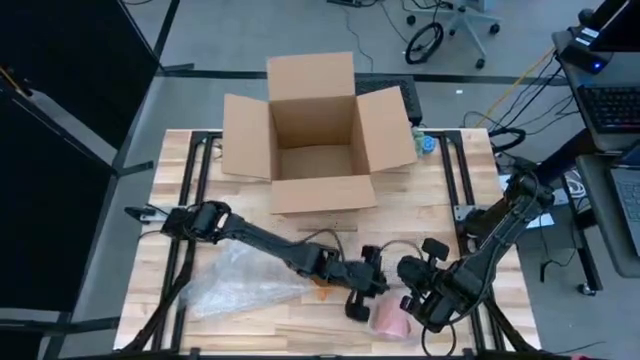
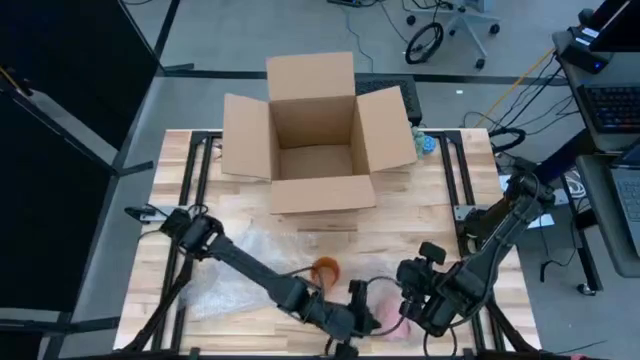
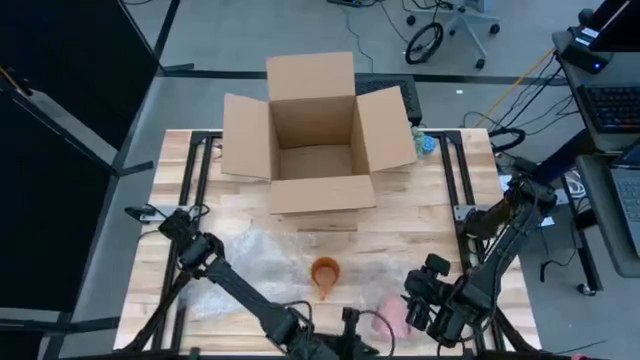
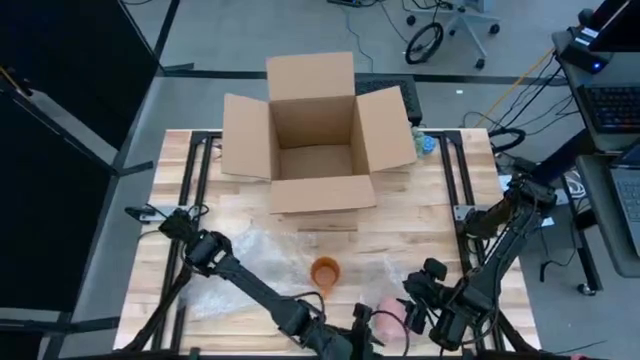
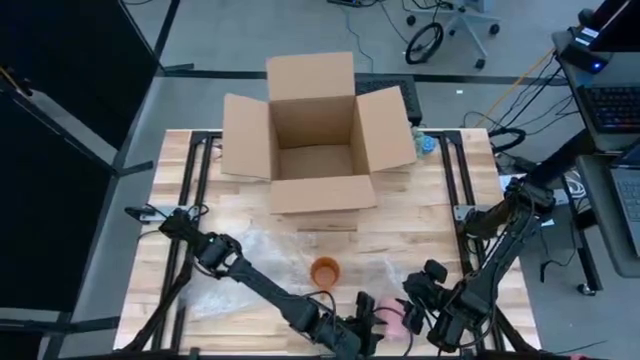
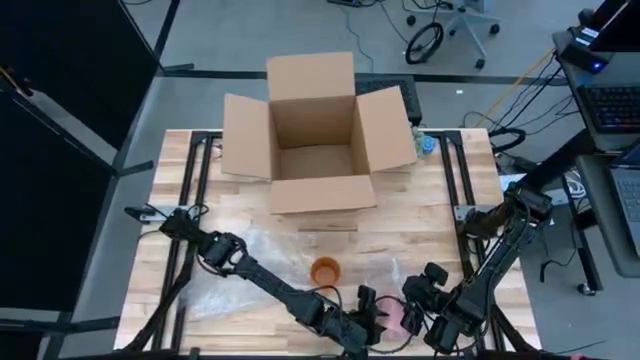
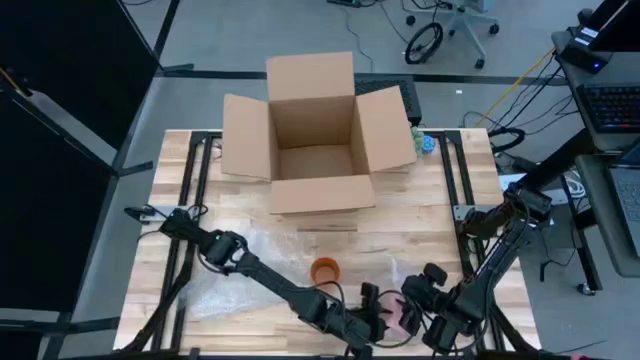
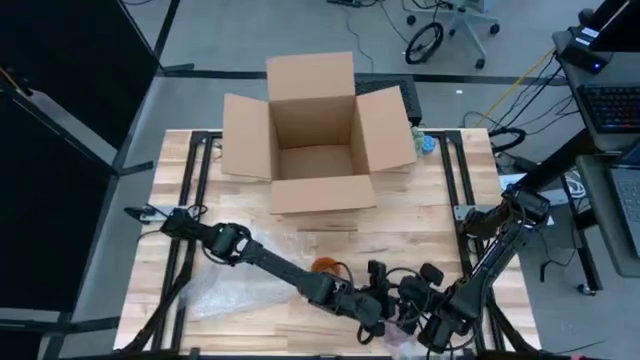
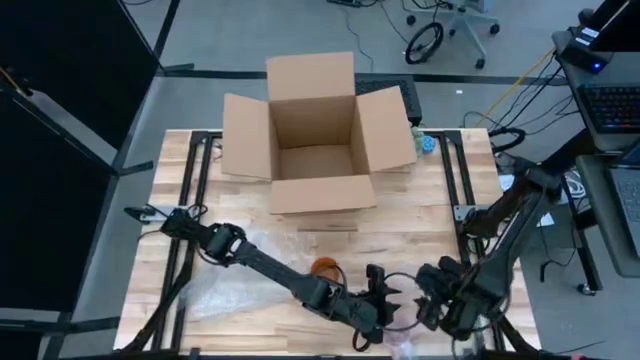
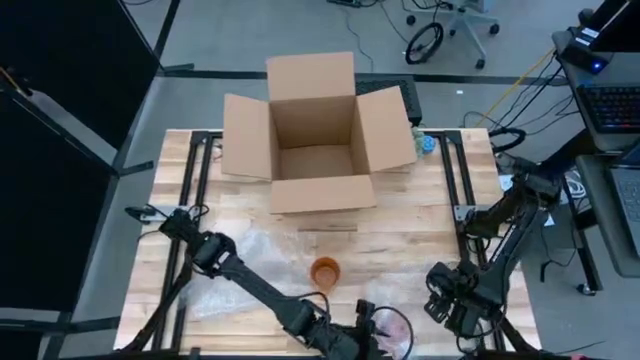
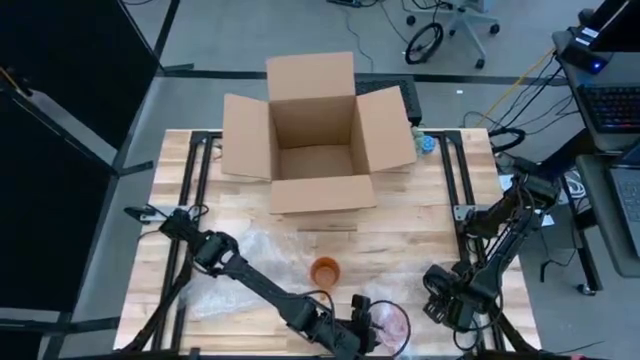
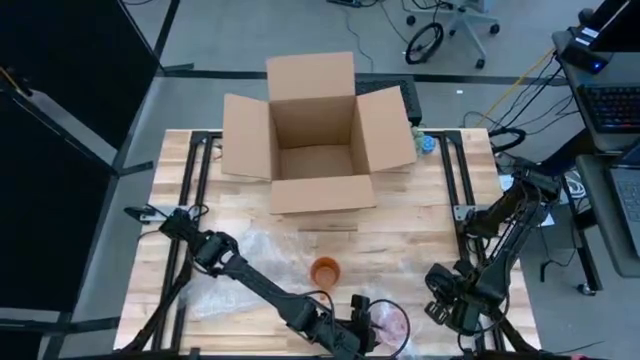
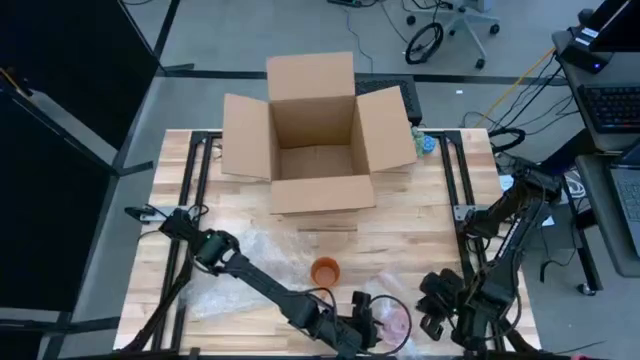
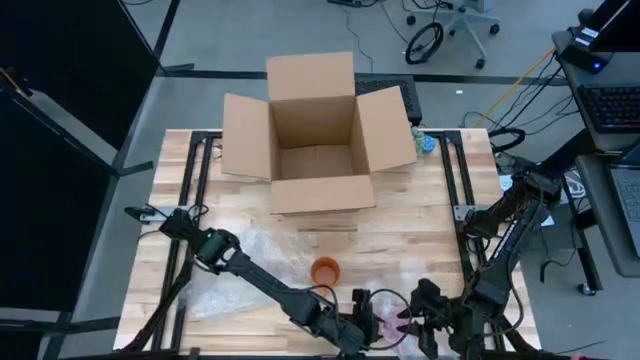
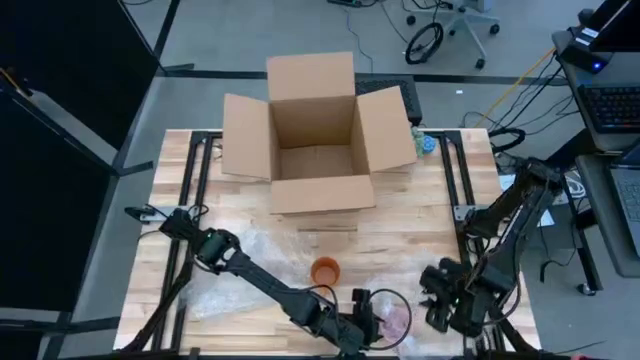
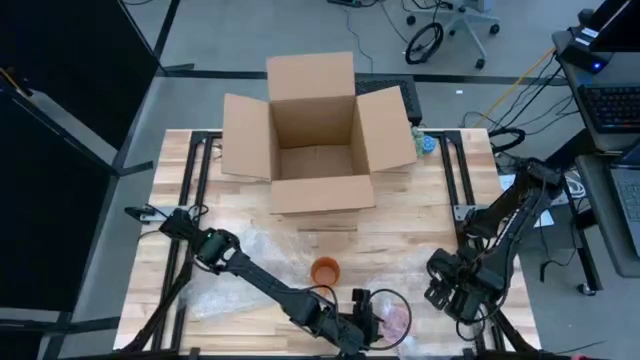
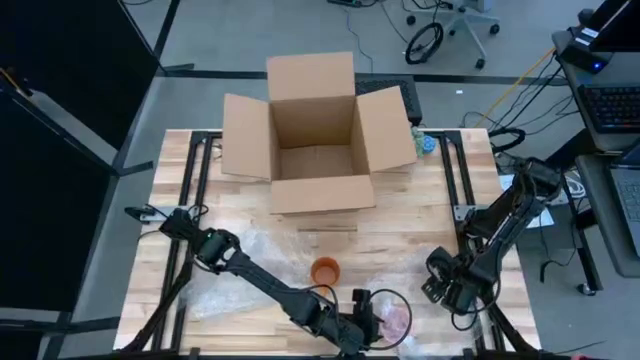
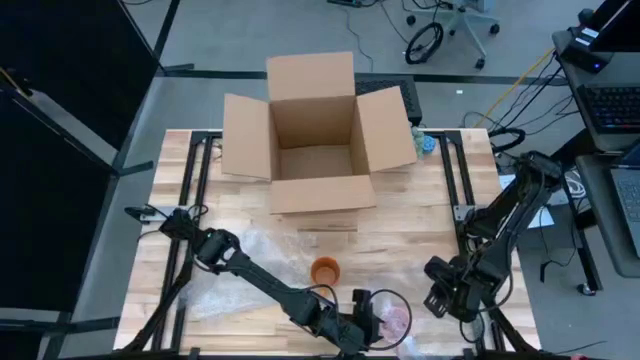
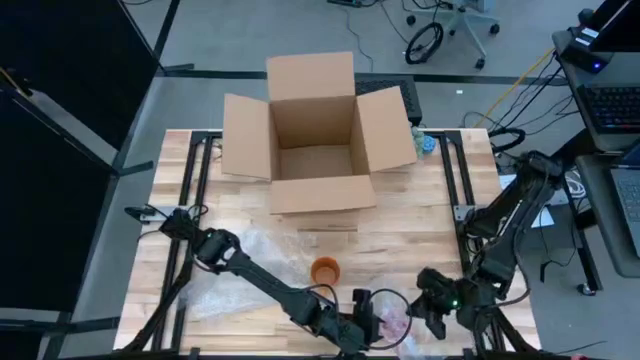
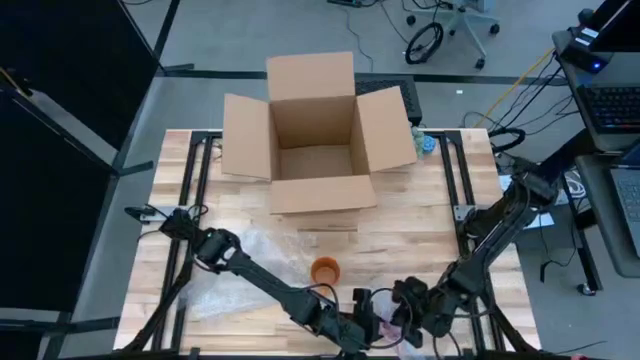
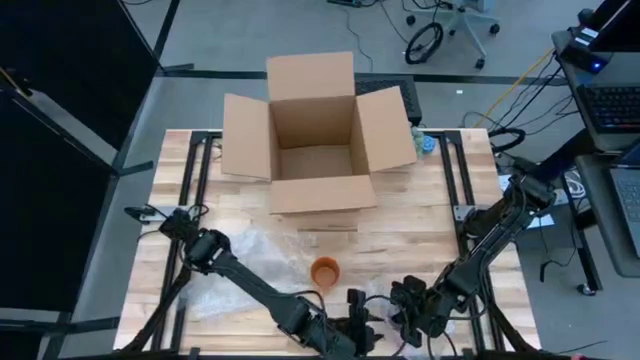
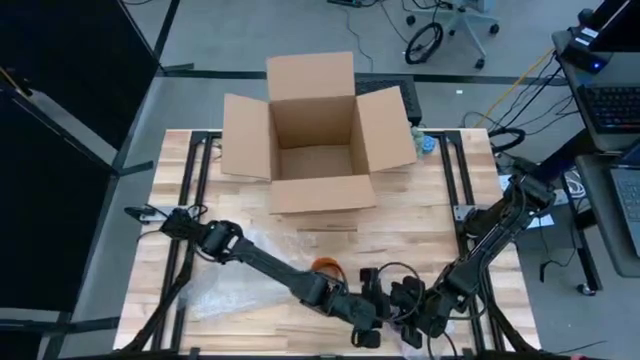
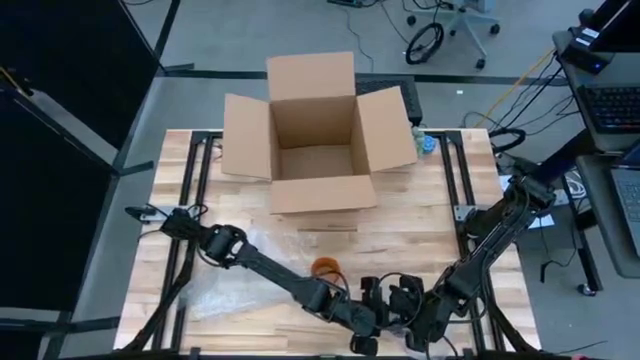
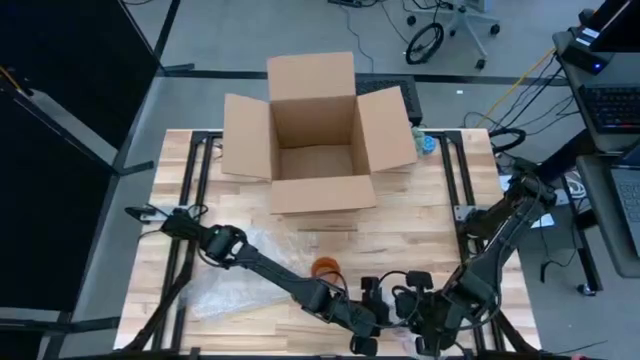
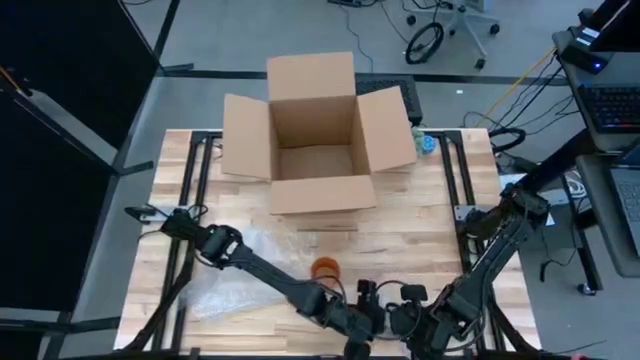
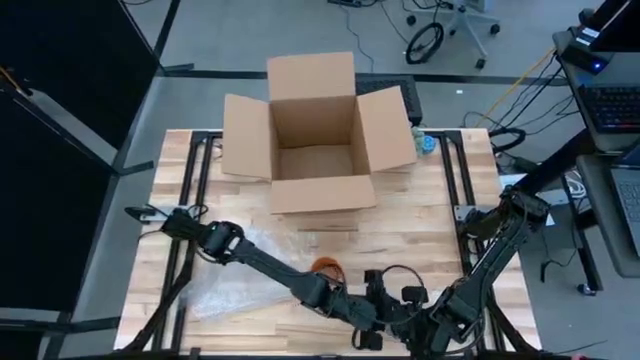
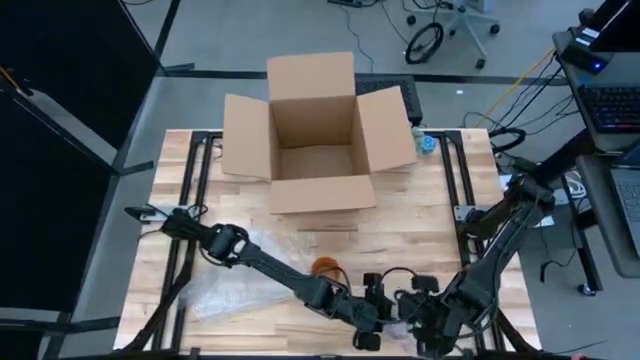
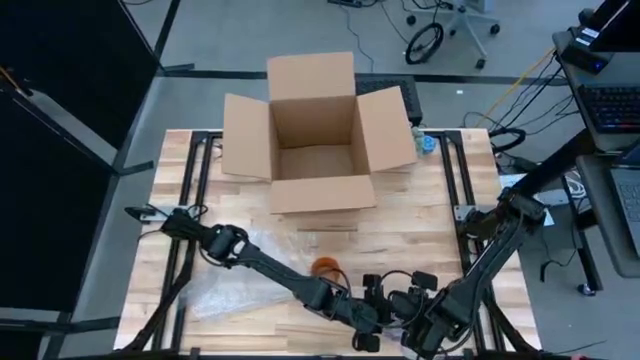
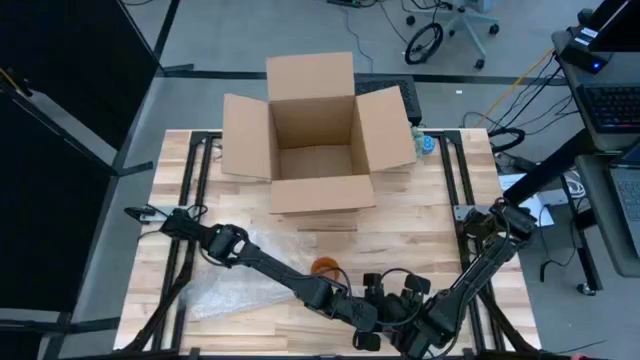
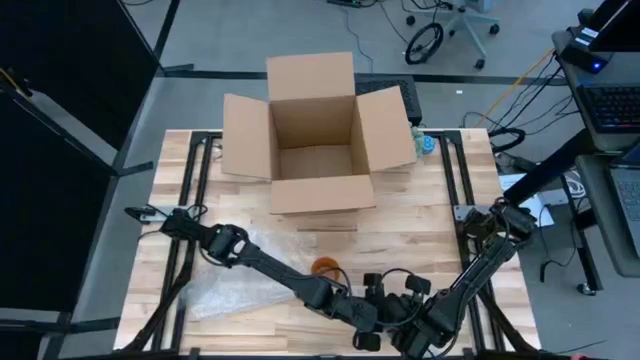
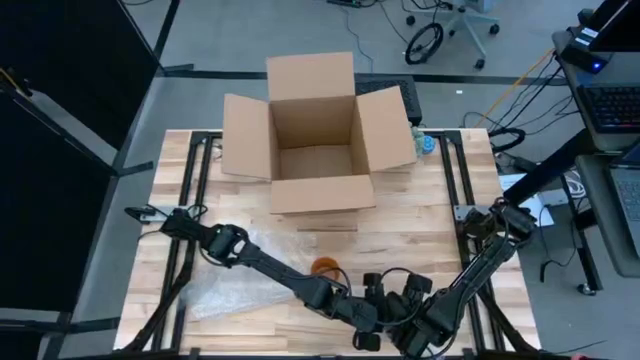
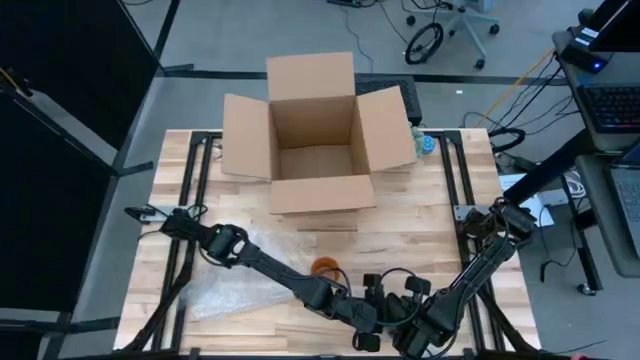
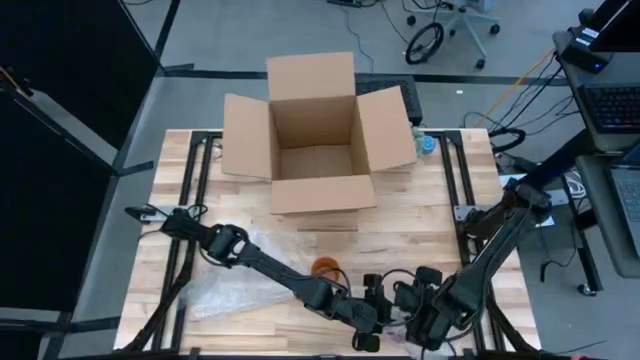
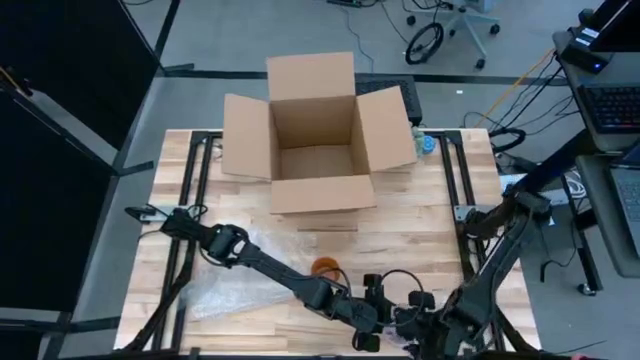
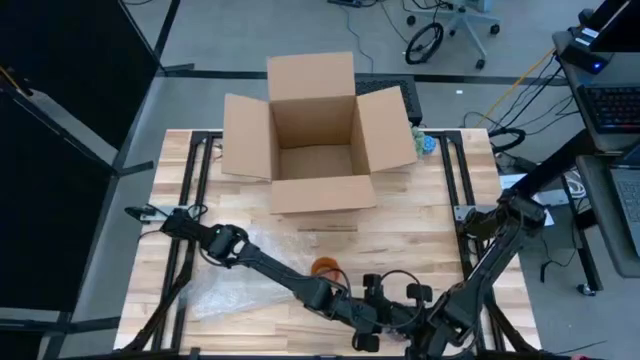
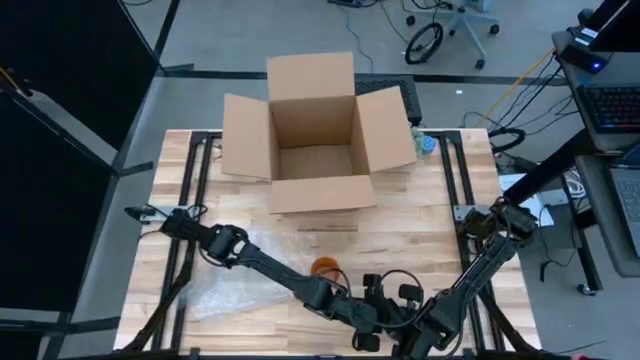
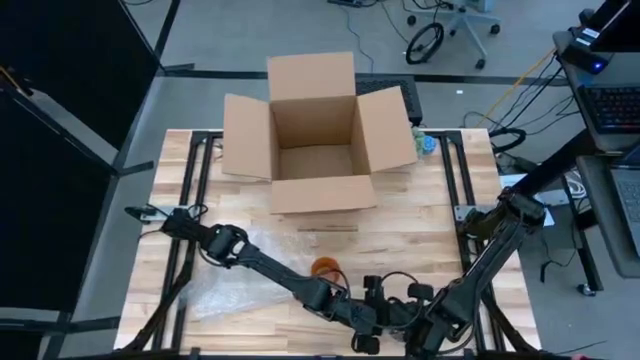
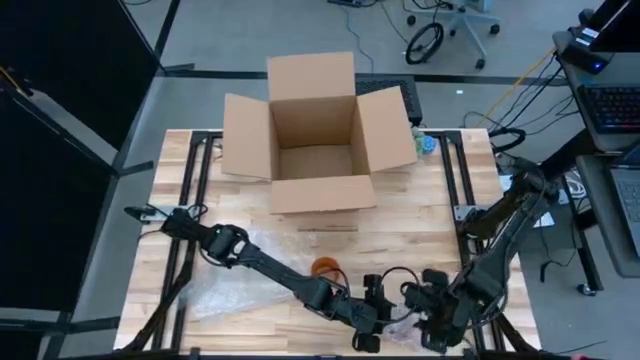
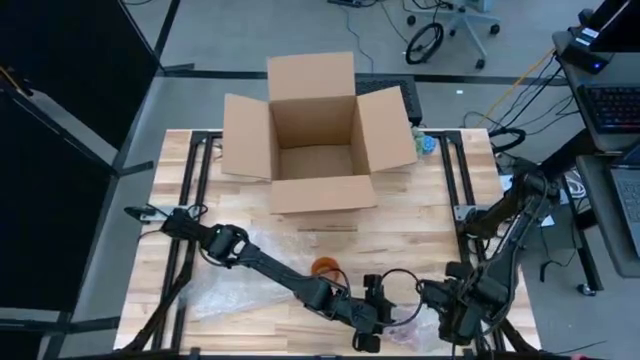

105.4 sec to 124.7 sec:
Task: wrap mug
Wrap the pink mug with the transparent bubble wrap
